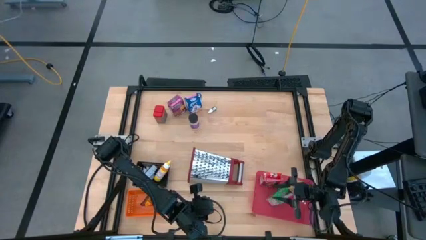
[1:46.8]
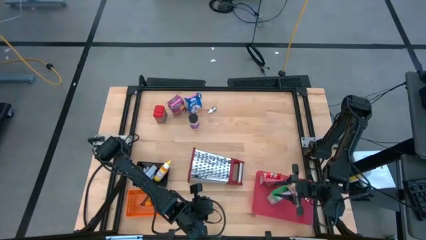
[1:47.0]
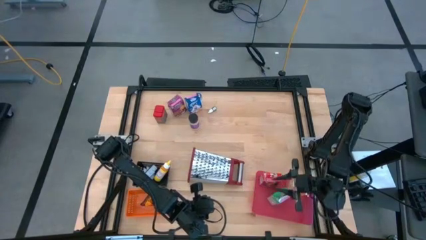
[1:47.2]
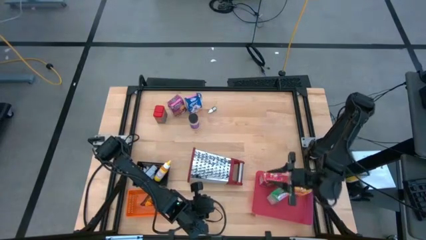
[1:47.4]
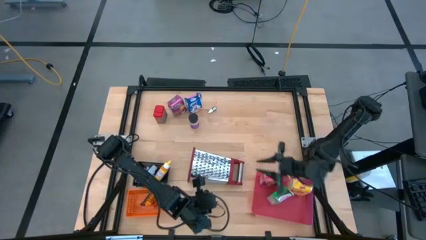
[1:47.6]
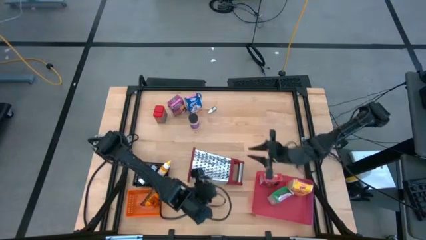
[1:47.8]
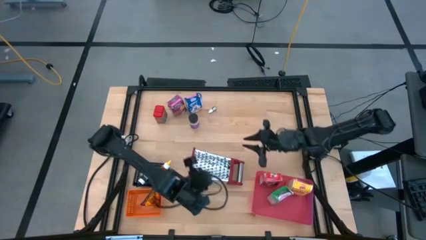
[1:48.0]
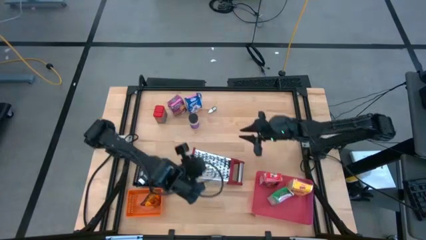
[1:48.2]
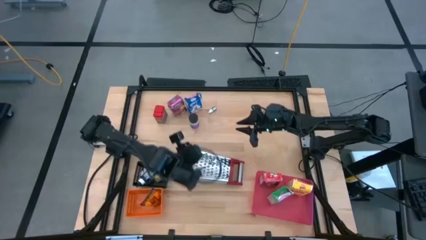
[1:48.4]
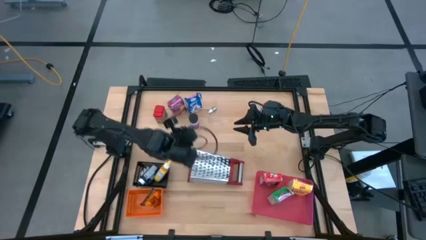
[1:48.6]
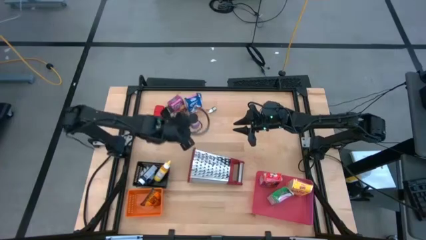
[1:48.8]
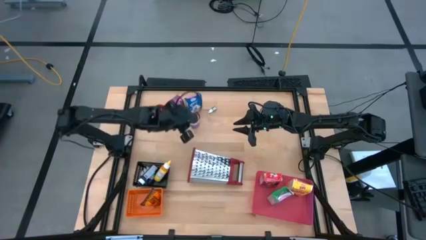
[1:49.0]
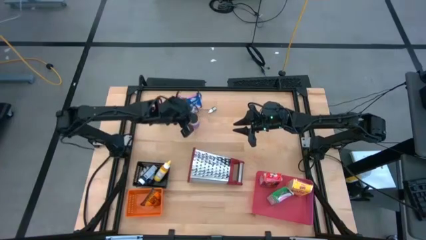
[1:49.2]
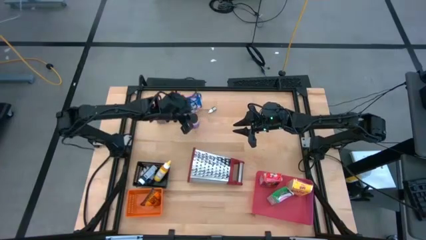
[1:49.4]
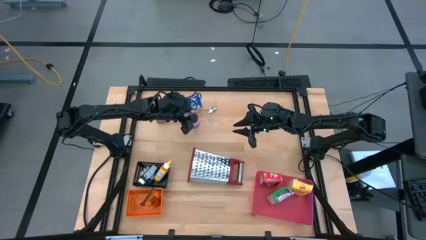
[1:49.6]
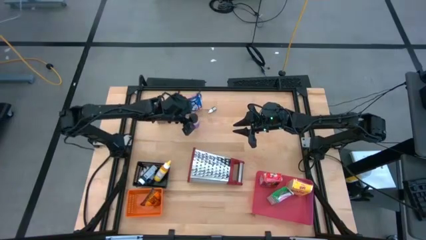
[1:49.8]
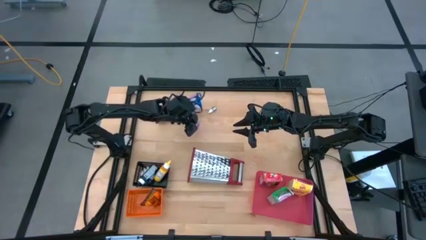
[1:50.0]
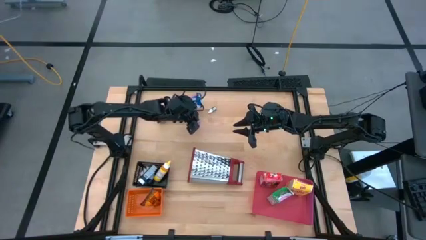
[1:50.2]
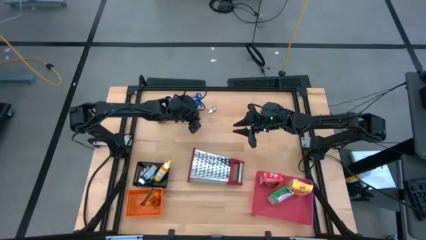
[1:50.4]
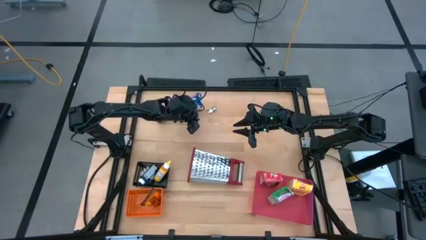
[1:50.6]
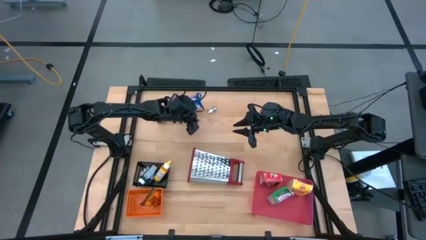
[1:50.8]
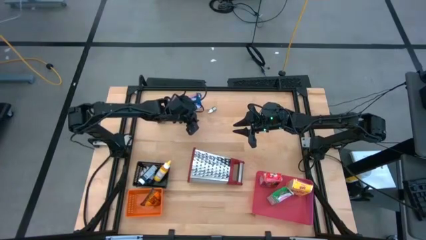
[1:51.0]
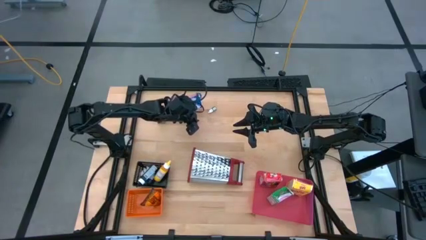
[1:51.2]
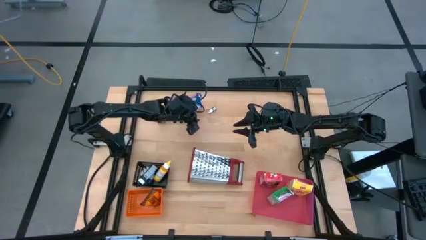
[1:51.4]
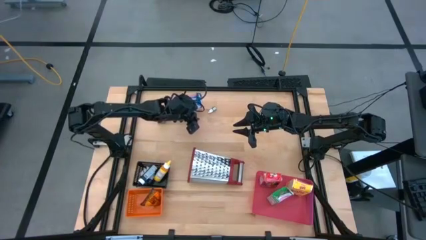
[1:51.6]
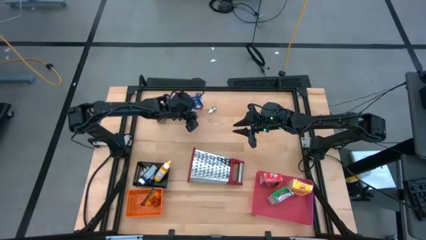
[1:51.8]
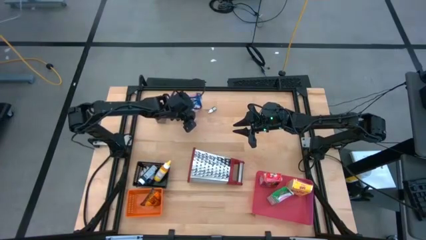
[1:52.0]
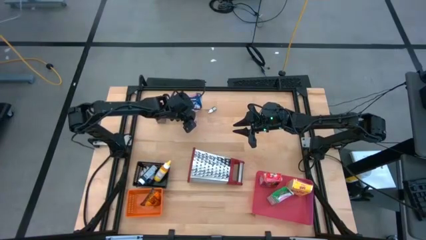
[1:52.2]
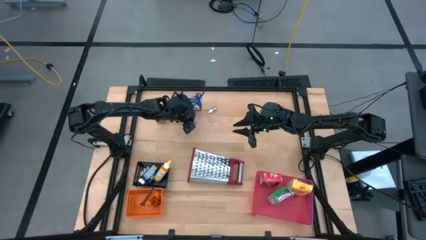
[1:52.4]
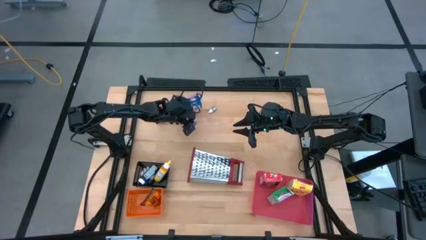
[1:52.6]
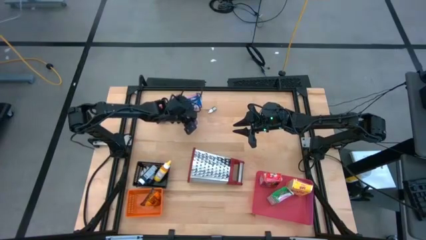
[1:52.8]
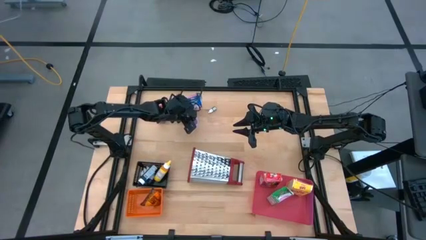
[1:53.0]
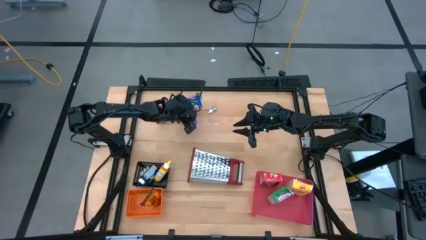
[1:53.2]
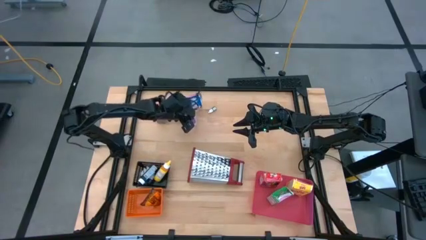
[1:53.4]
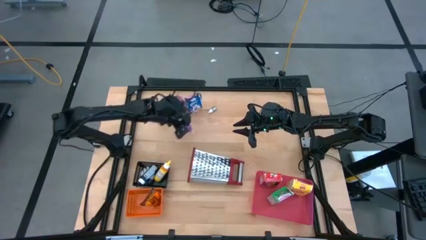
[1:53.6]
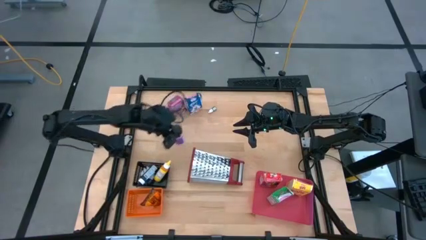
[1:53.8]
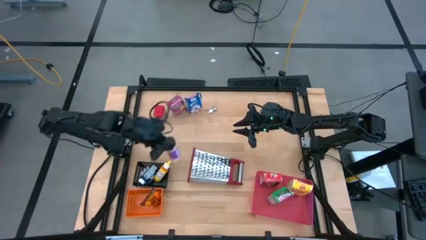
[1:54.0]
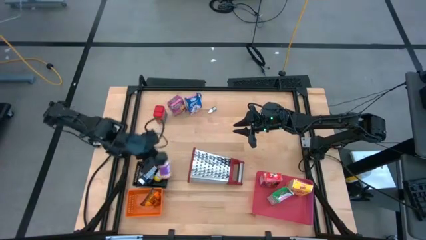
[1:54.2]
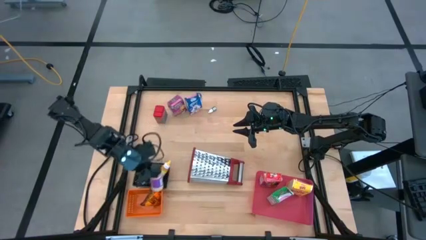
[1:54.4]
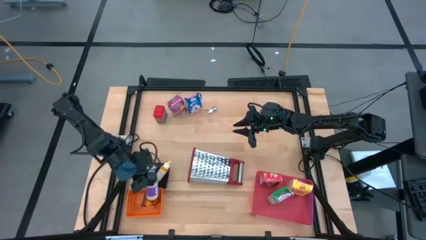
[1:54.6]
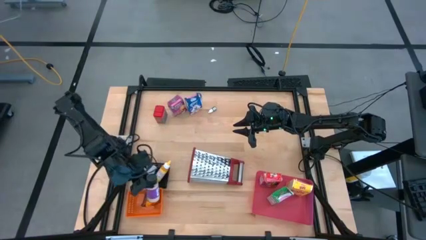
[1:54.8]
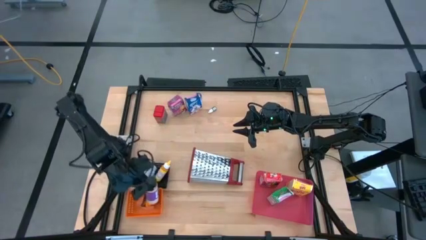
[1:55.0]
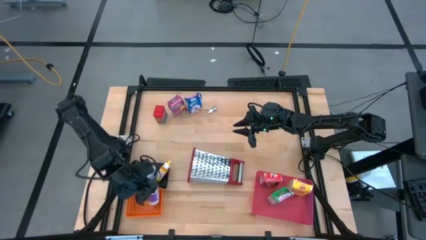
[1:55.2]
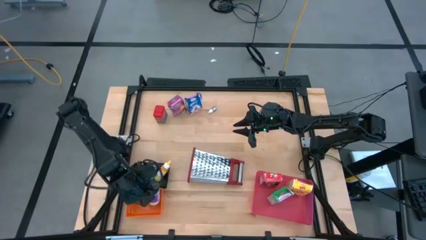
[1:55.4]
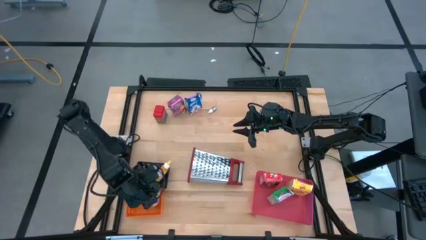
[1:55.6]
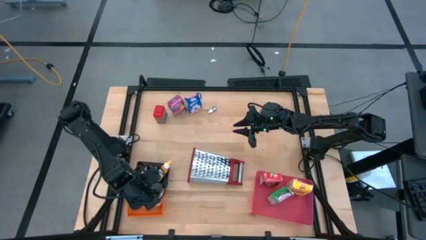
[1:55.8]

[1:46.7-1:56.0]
Task: Pick & Place Kitchen Items
Put the violet seasoning bottle into the orange bin

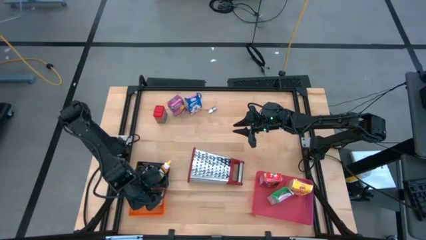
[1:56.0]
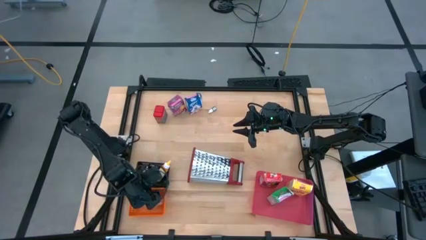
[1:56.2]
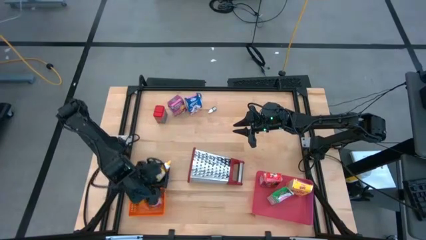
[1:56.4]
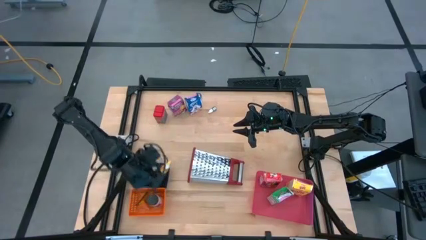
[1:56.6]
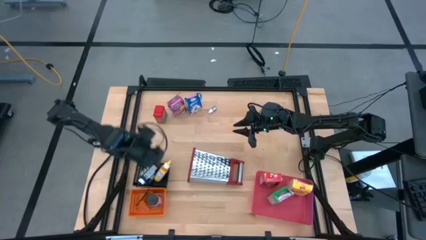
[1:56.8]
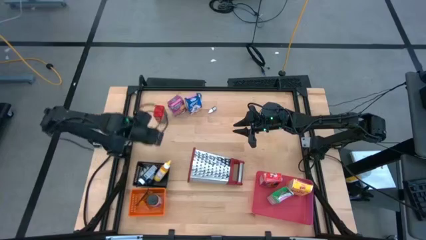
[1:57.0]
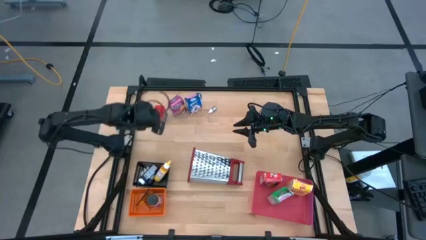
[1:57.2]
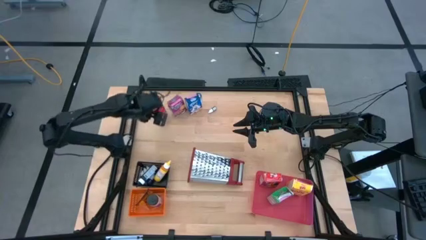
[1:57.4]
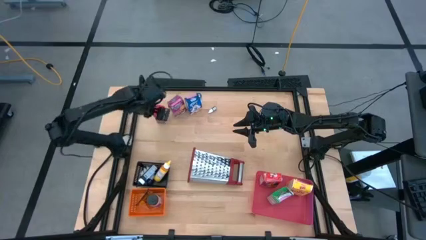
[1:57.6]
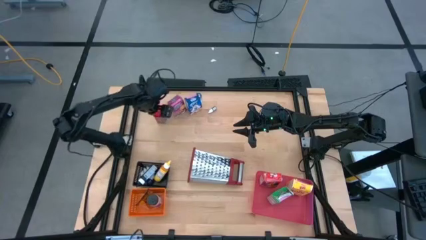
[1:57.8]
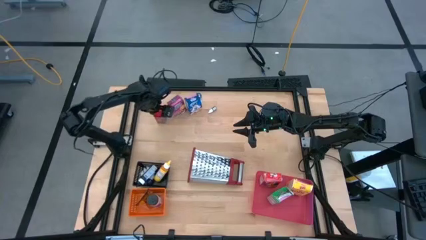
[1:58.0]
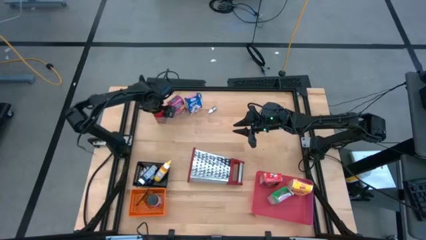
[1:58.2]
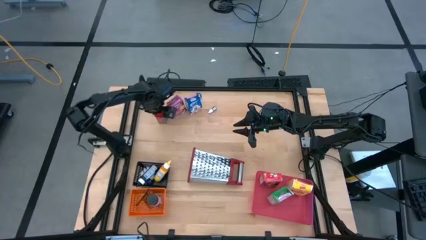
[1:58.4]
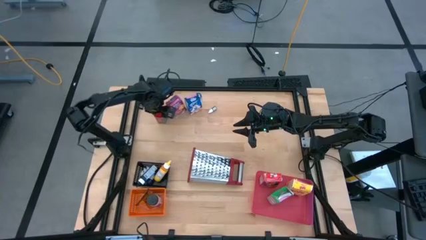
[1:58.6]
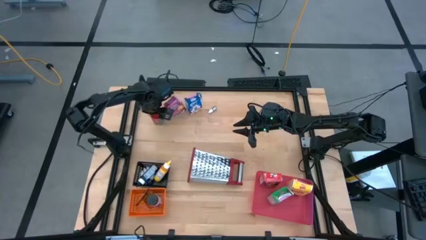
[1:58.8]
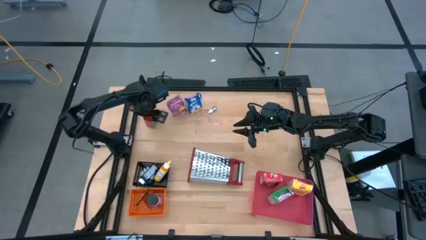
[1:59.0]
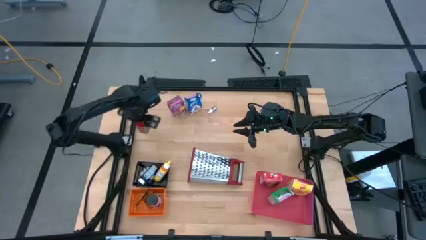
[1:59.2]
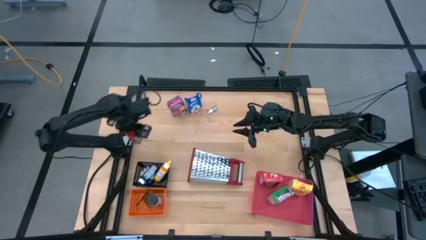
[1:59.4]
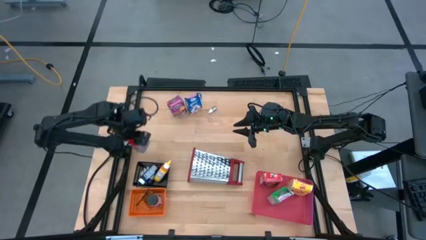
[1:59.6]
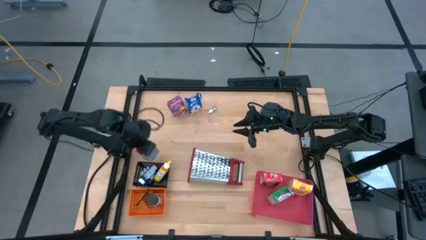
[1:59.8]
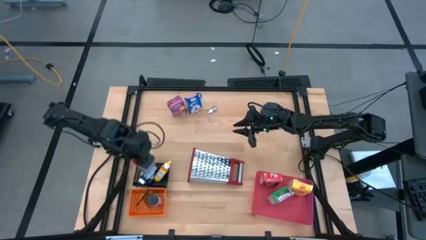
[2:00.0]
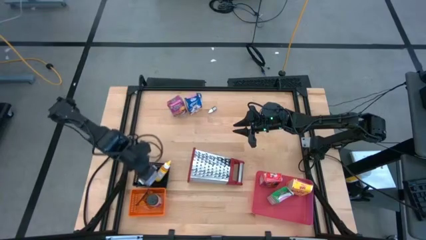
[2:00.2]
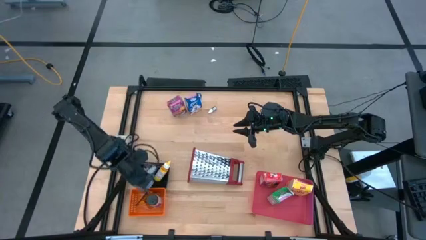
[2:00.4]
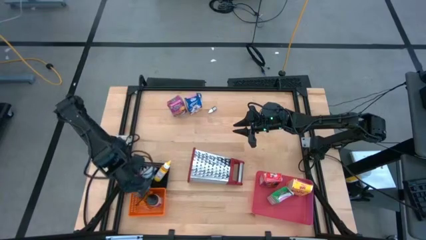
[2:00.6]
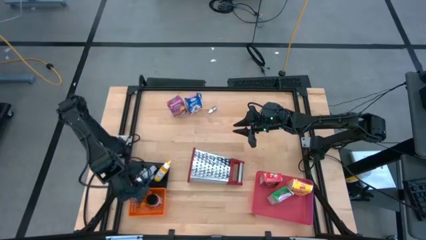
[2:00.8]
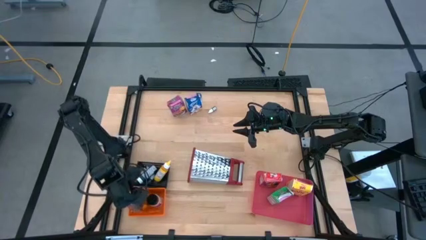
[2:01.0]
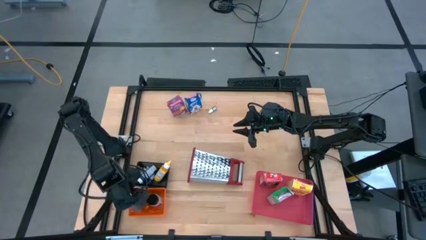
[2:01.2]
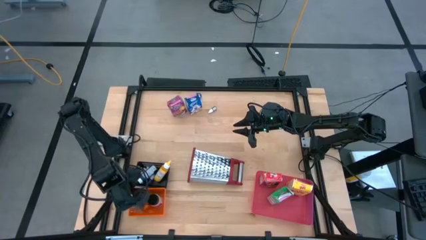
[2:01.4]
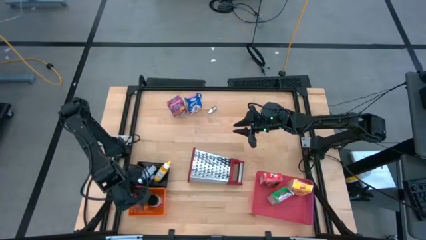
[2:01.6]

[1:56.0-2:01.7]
Put the red seasoning can into the orange bin

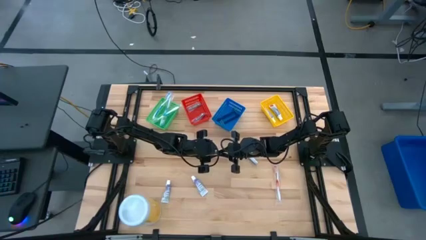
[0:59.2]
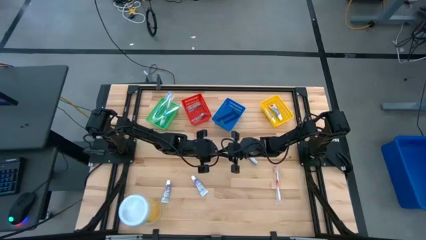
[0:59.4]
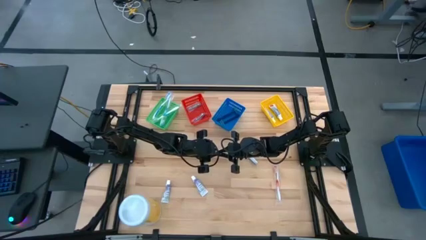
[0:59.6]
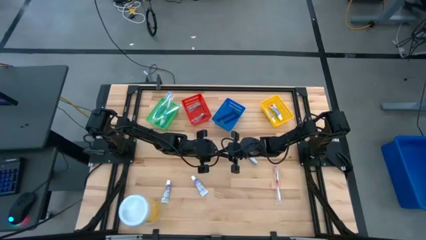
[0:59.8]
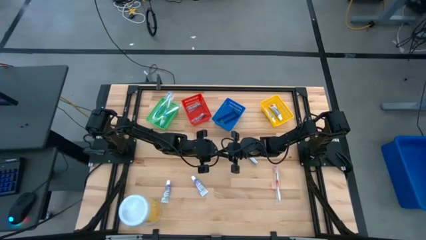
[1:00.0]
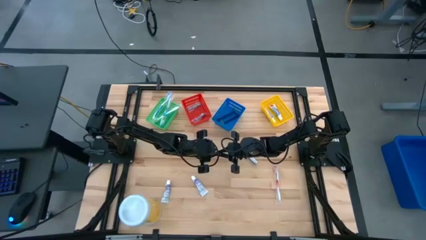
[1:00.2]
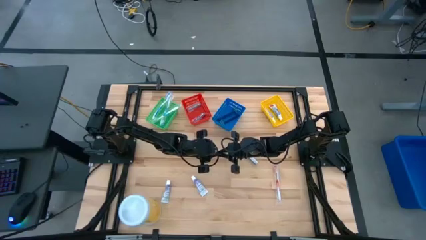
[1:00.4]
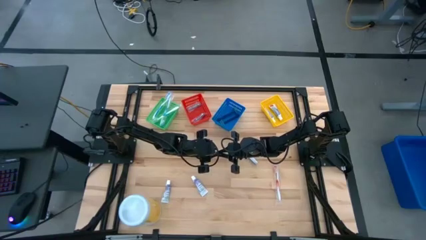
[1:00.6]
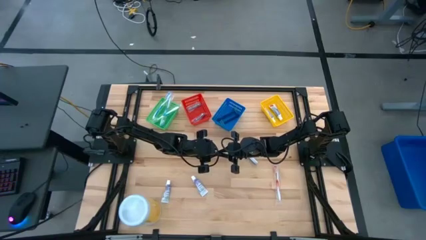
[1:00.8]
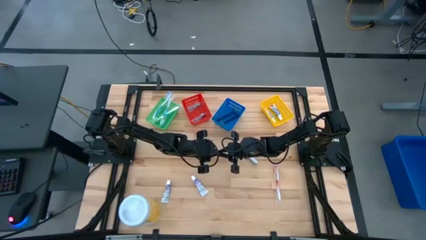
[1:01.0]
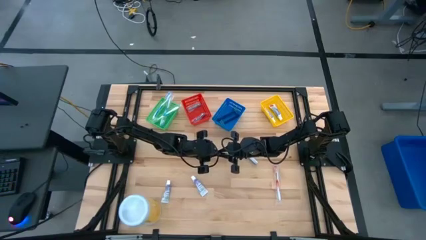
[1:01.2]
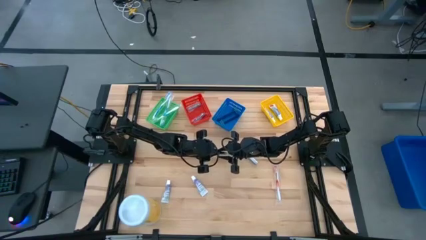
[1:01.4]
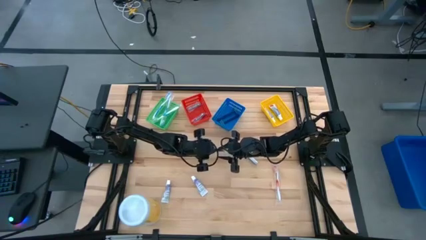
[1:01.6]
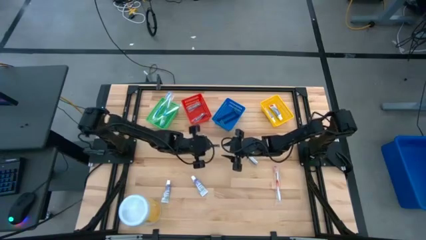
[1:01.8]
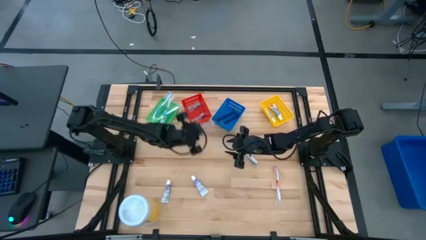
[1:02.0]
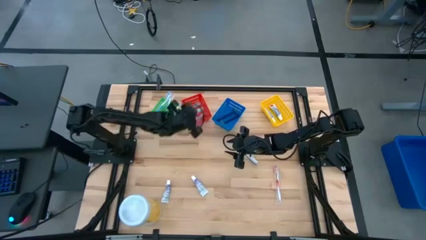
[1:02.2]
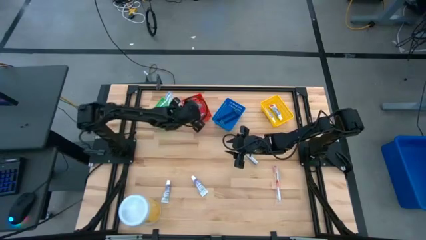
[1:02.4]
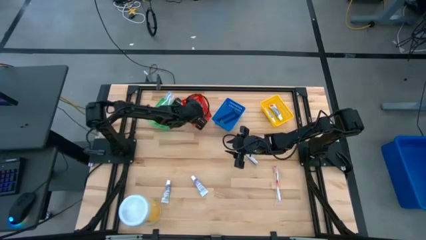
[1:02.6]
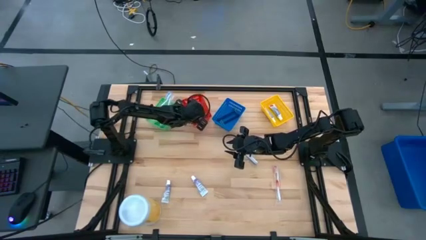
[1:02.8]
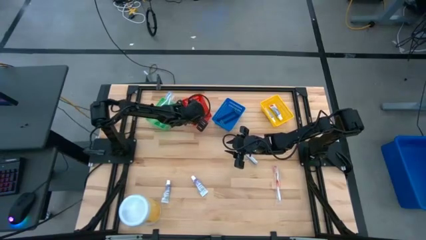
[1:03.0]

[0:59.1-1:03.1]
Task: Pick & Place Travel size toiletries
Put the left nail cutter into the red basket
